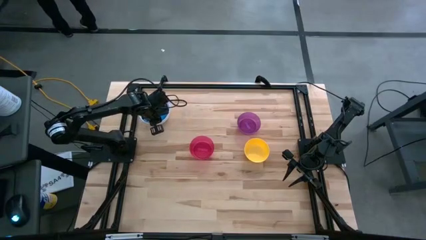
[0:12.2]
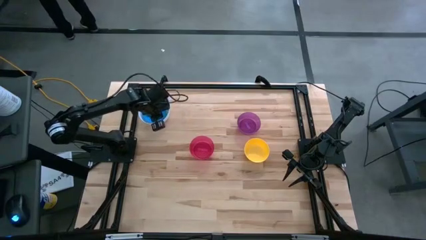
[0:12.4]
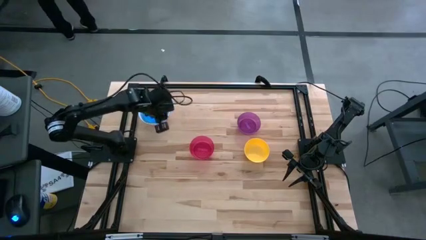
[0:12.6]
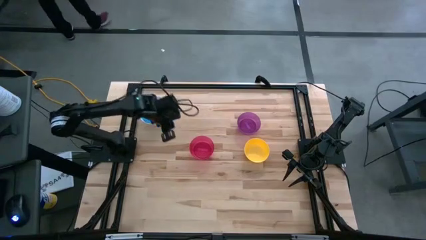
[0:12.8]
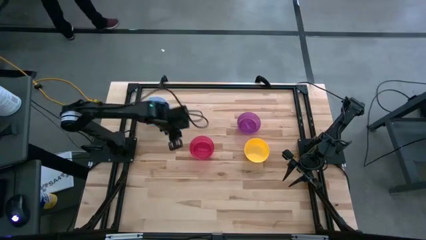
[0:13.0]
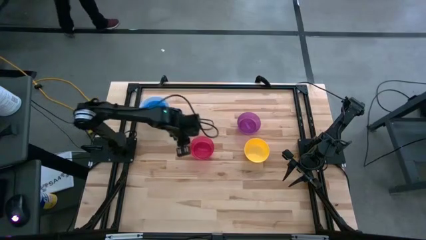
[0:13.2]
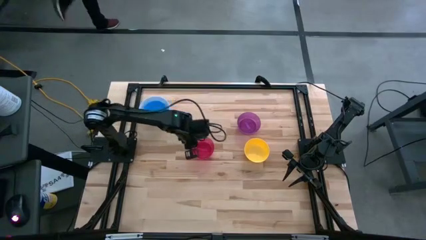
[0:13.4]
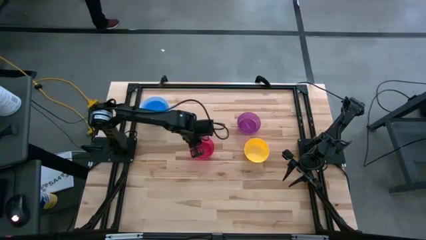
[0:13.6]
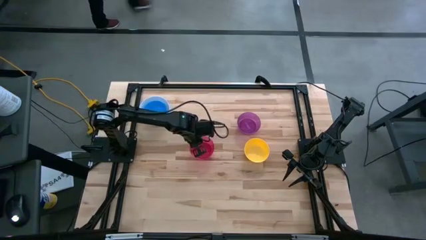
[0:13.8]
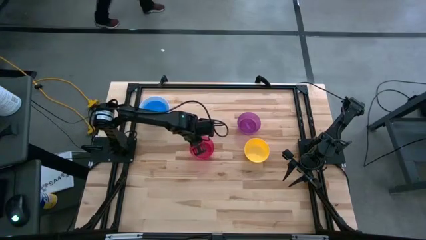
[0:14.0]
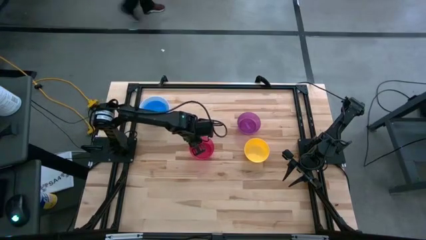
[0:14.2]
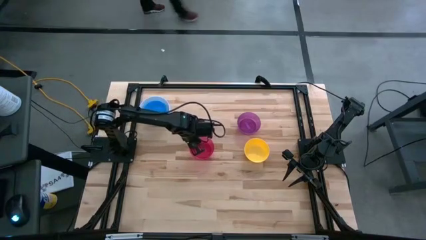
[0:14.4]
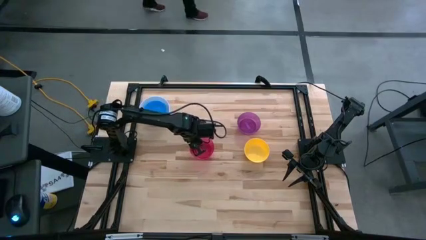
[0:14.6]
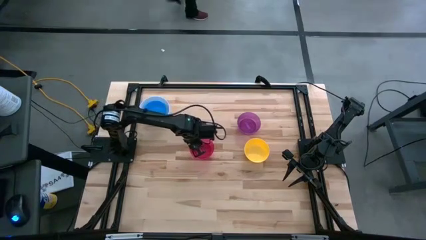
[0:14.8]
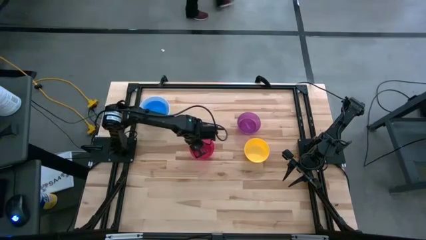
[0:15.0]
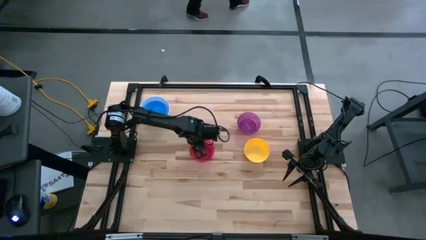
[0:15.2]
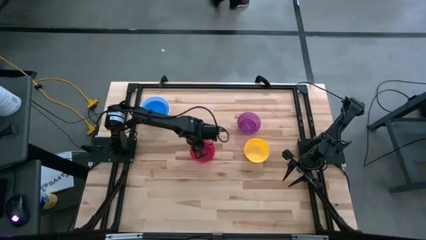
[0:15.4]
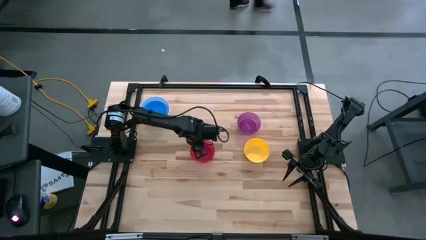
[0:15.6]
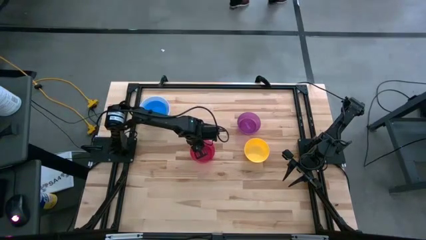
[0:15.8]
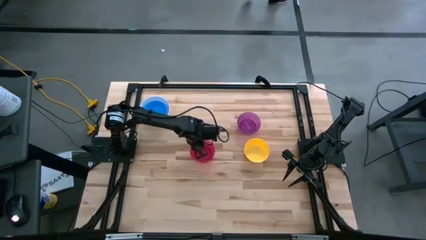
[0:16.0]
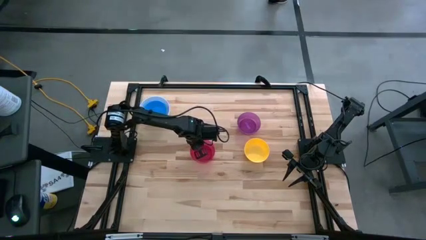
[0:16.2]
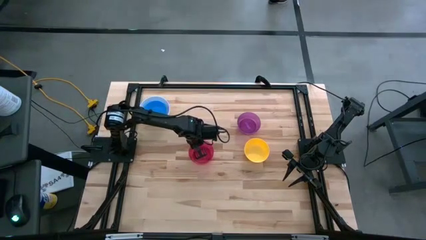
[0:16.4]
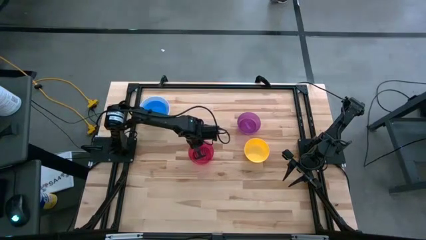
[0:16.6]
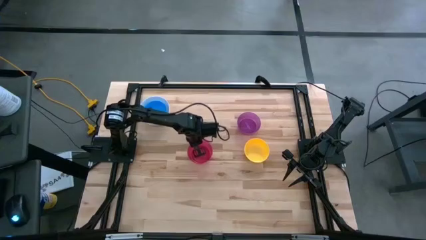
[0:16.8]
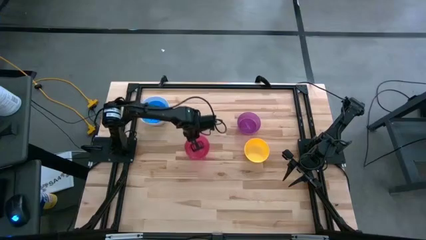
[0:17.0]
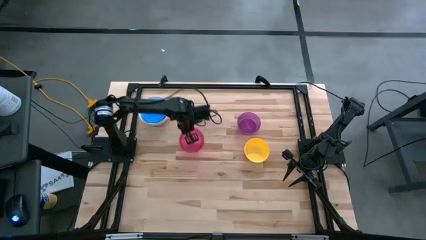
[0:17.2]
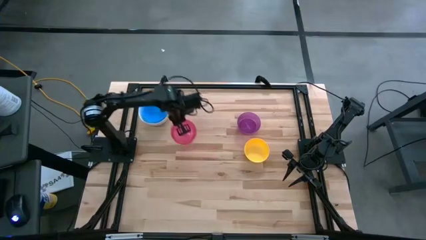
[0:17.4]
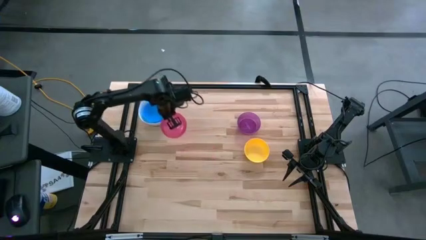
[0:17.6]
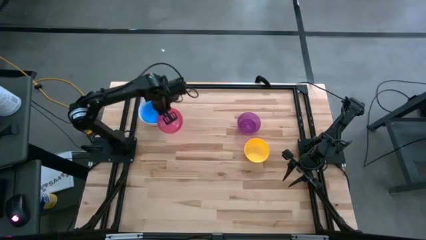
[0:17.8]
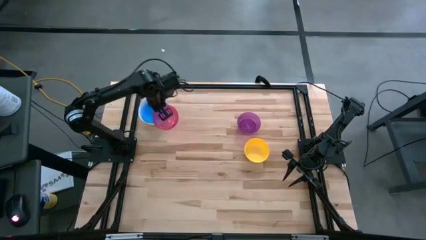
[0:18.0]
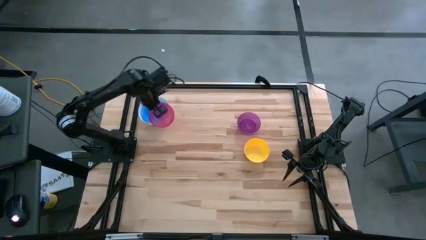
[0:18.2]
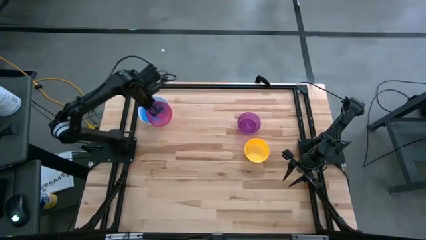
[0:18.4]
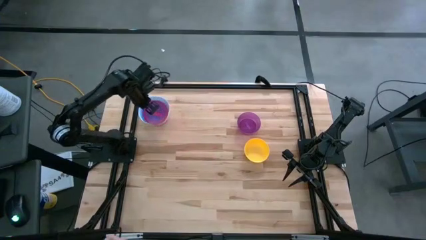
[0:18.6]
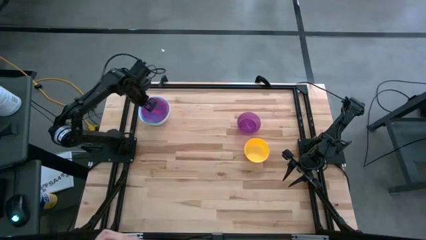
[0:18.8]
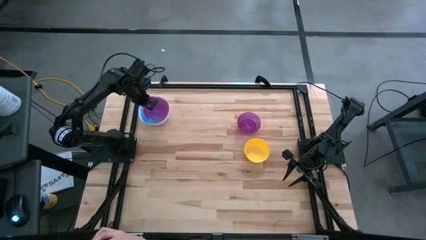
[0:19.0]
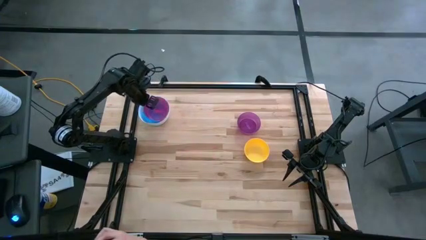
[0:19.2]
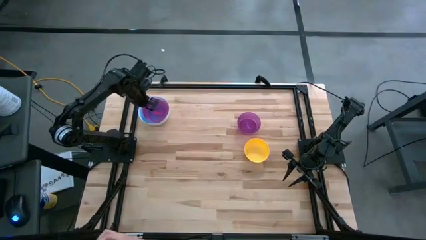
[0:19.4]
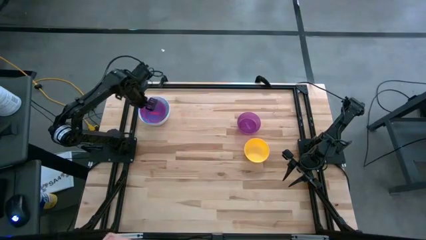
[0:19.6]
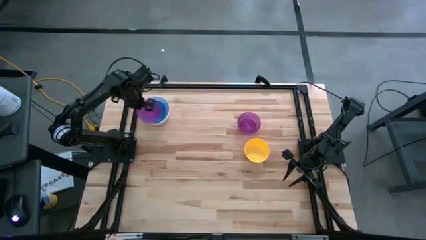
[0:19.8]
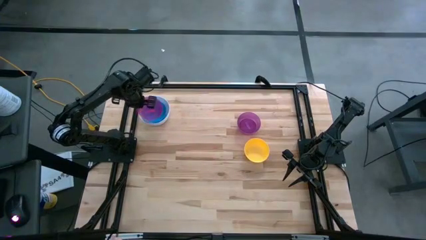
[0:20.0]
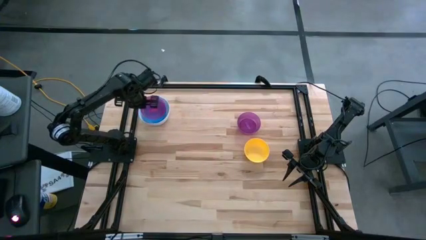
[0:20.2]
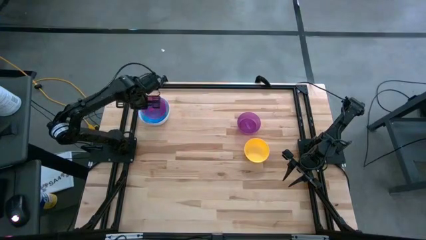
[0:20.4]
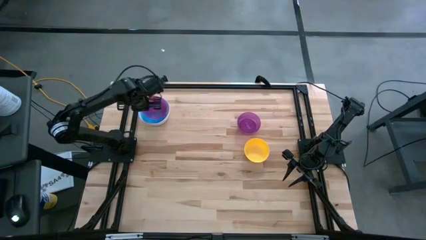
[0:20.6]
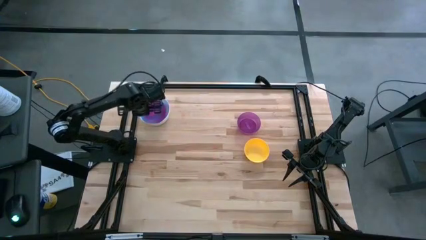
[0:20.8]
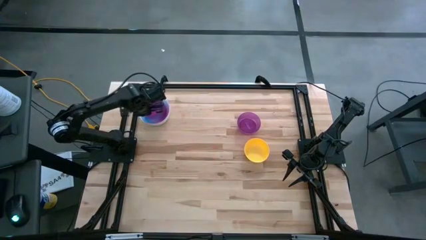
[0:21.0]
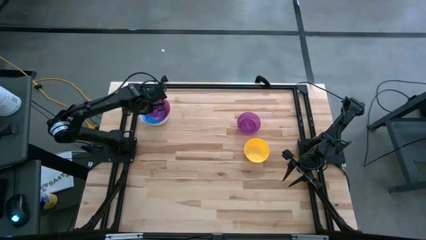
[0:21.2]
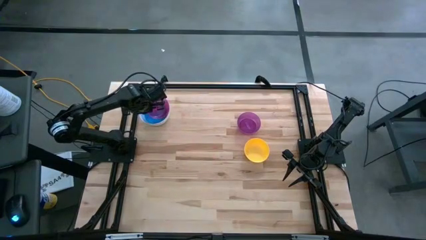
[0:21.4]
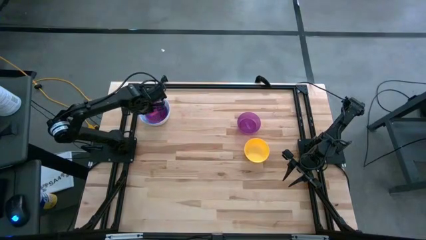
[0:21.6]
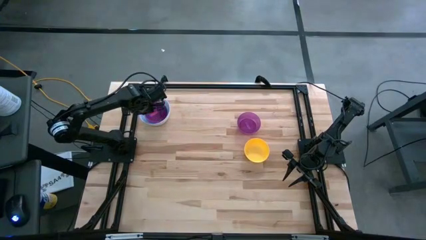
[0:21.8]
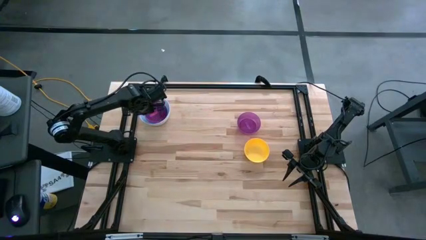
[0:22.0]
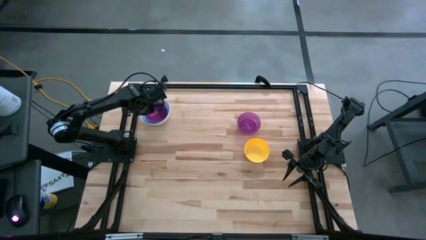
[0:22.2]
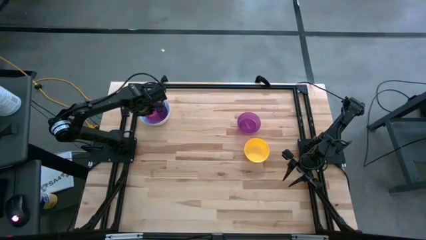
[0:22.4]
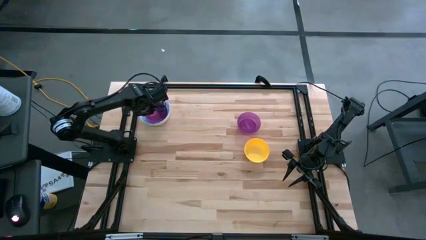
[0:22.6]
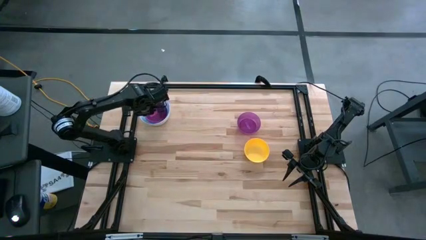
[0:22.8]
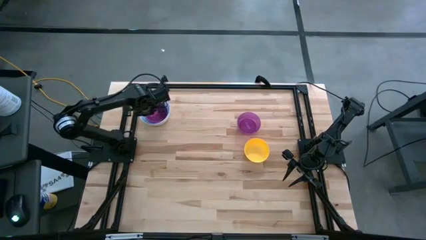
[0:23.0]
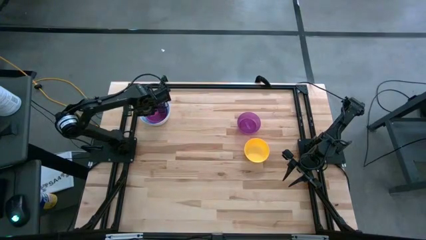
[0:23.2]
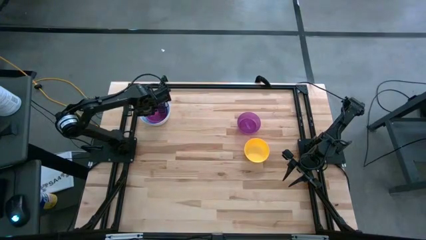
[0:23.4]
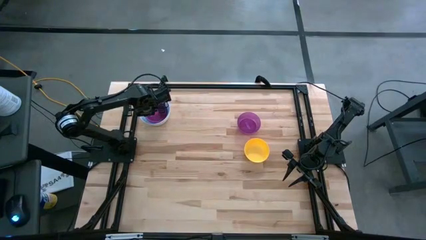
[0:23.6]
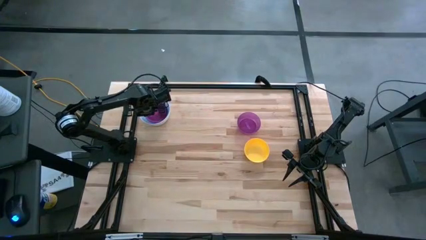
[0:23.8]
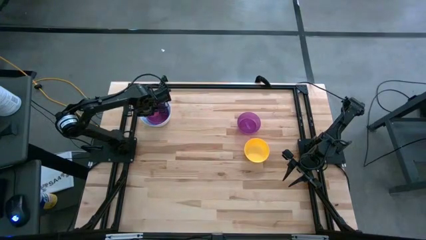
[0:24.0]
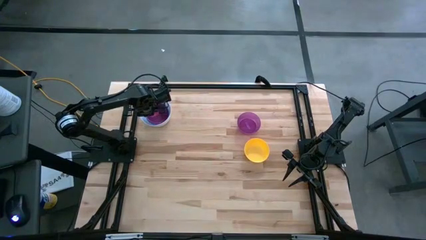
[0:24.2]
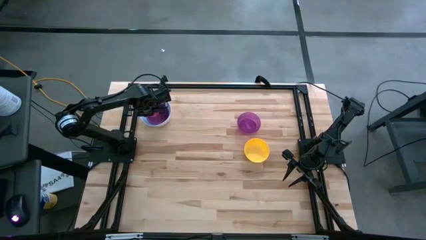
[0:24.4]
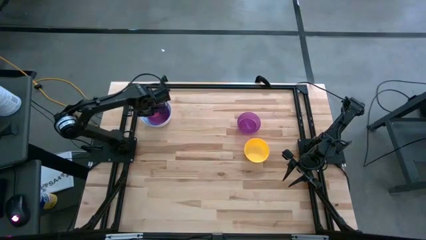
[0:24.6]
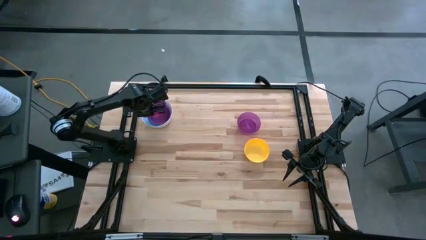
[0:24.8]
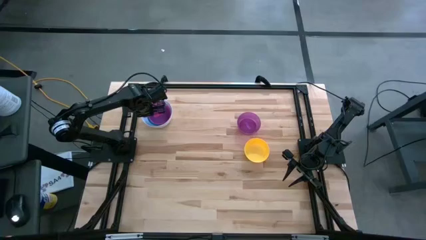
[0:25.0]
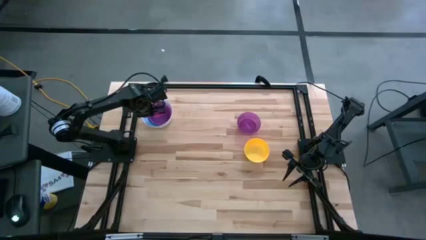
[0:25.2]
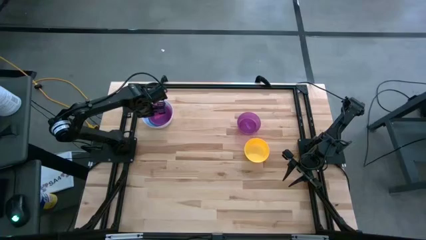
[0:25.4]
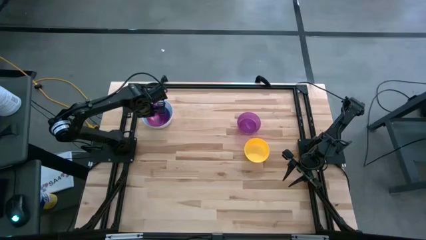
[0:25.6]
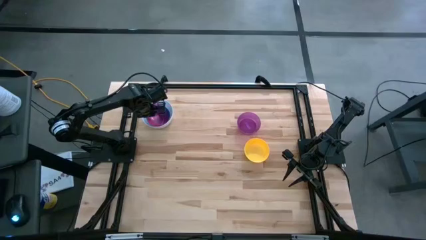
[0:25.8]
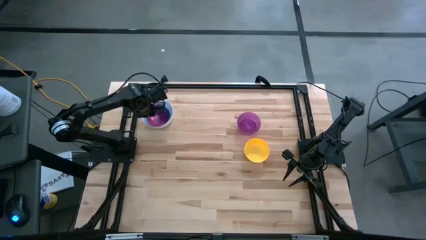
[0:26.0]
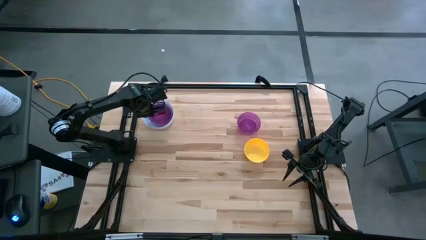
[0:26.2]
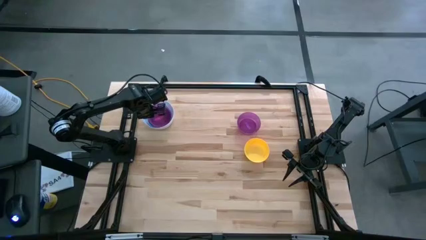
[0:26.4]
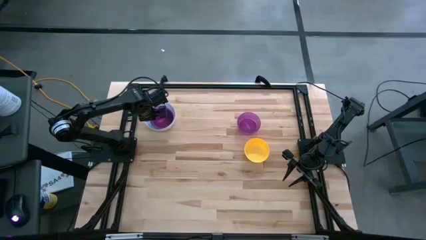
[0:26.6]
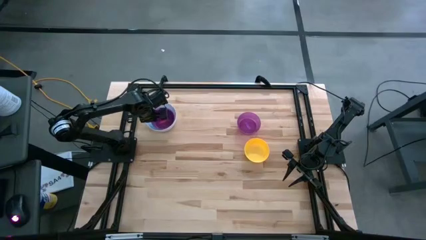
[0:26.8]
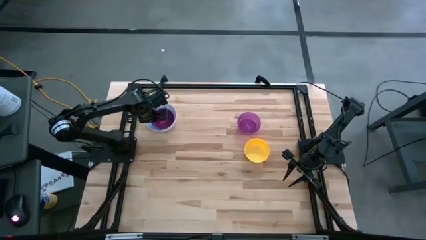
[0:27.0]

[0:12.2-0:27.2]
Stack the red bowl on top of the blue bowl
